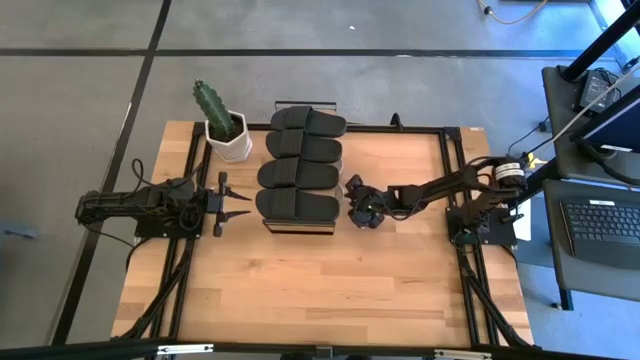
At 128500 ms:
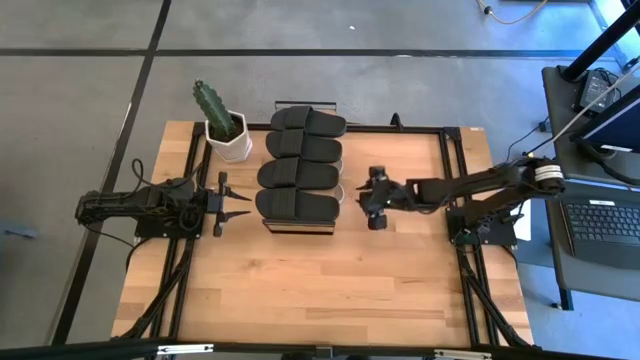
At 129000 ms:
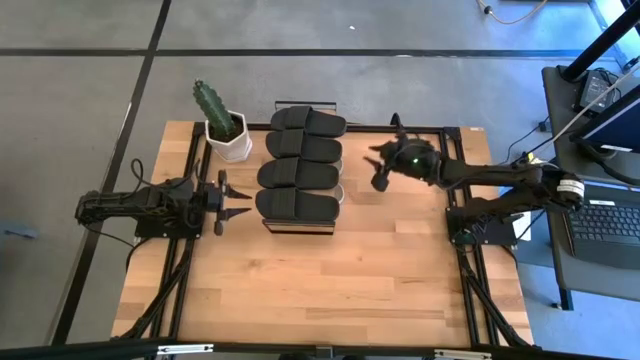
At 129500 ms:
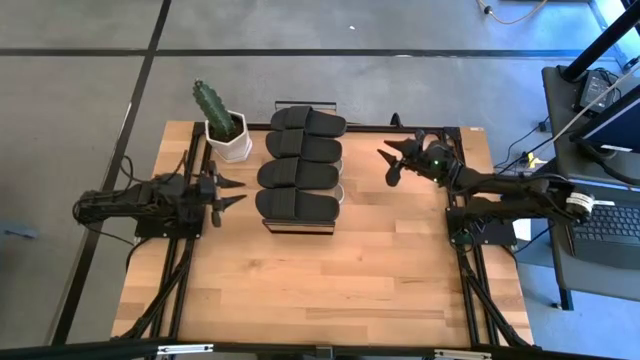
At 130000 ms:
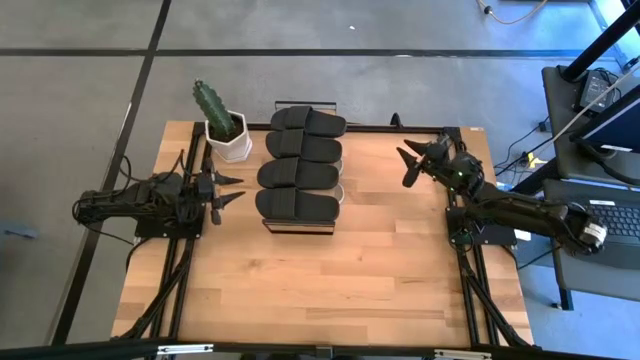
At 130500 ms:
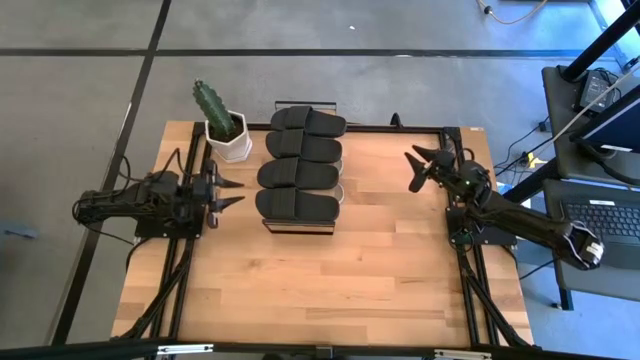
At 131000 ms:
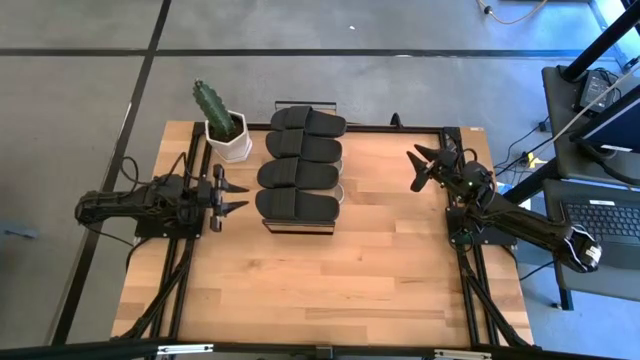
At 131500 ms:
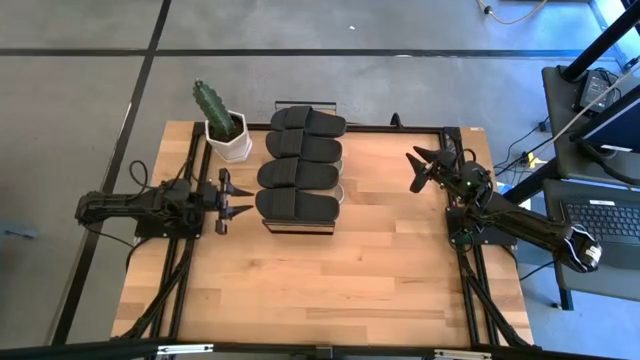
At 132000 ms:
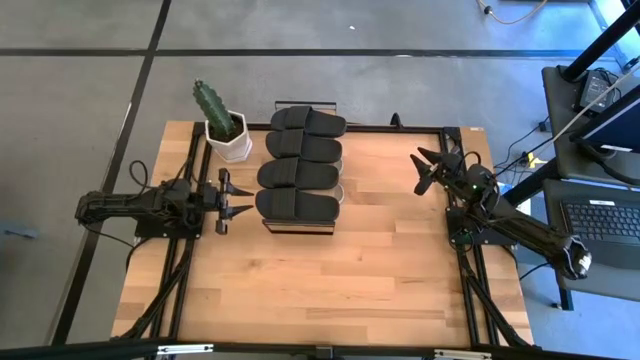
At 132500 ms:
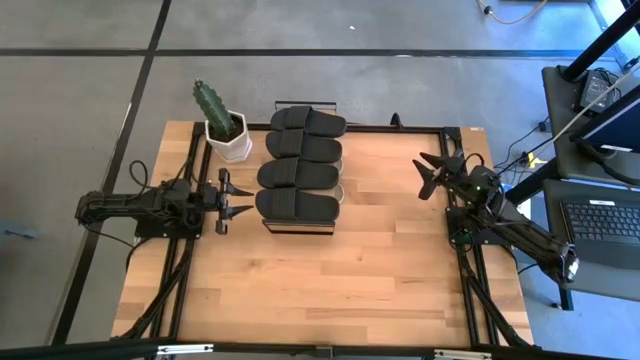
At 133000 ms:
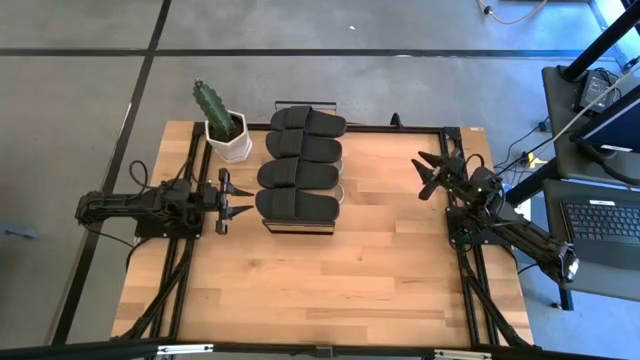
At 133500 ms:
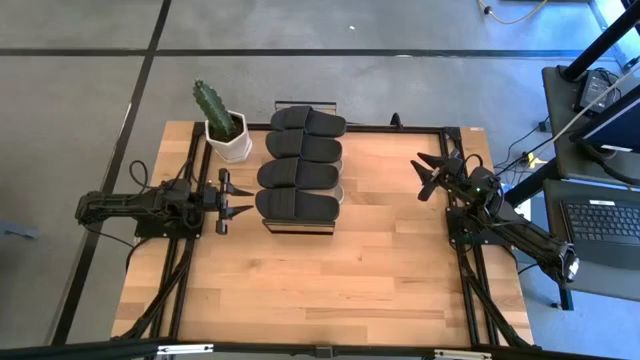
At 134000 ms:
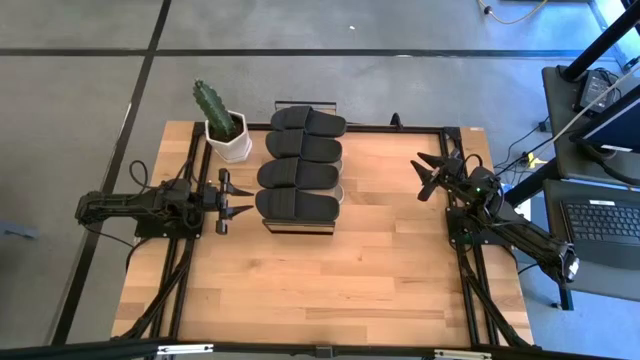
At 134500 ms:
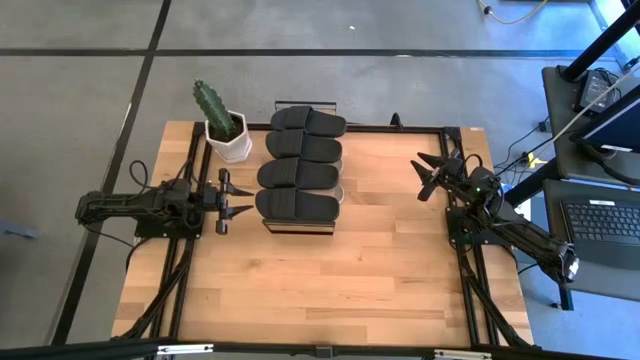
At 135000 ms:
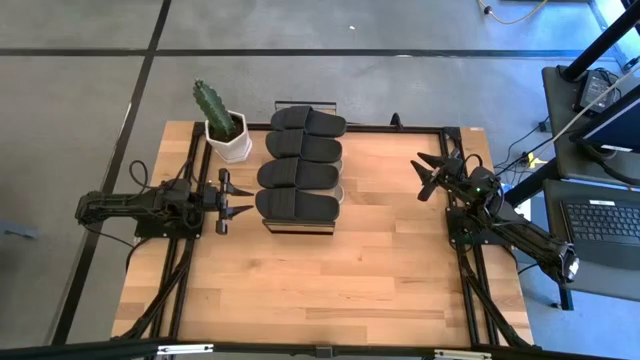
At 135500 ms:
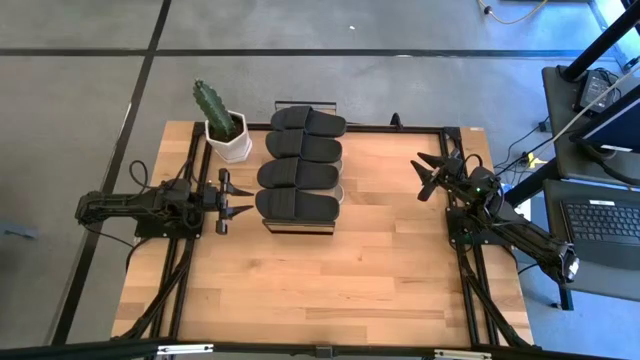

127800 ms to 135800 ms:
Task: Pick and place slides into the shelf
Return to home position

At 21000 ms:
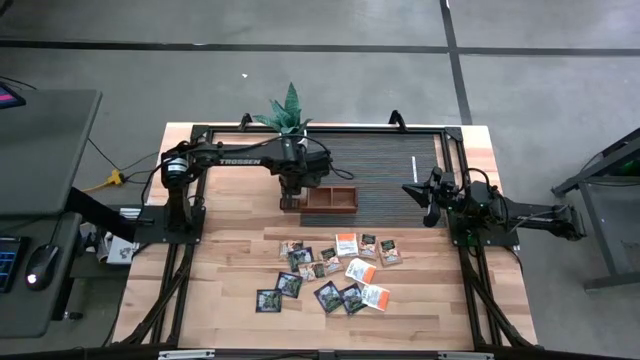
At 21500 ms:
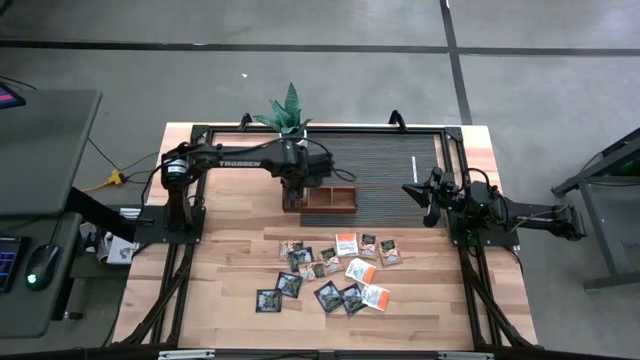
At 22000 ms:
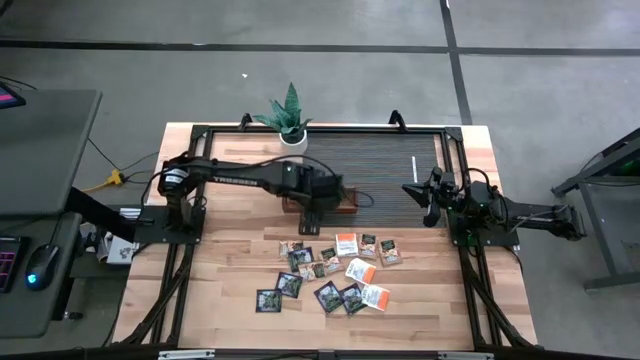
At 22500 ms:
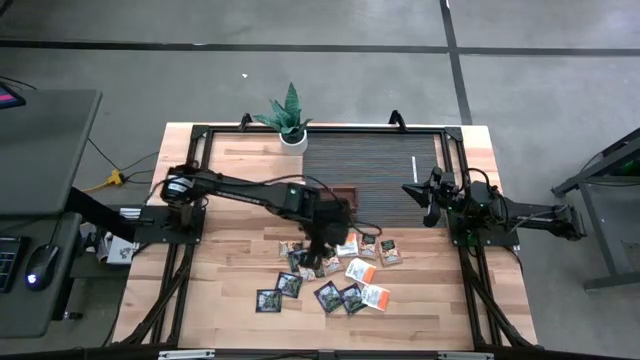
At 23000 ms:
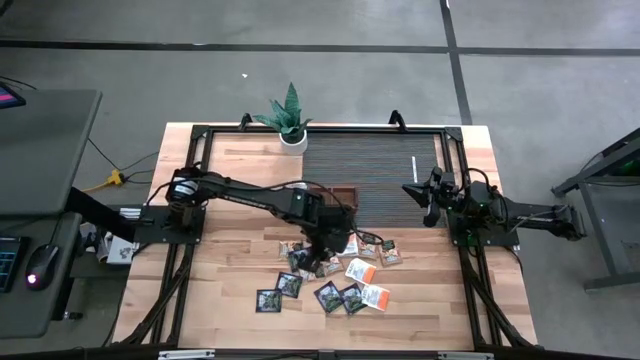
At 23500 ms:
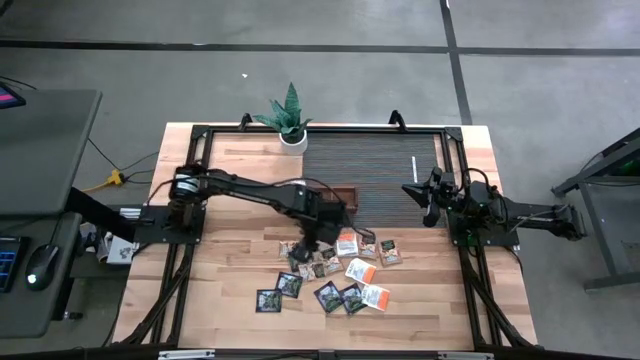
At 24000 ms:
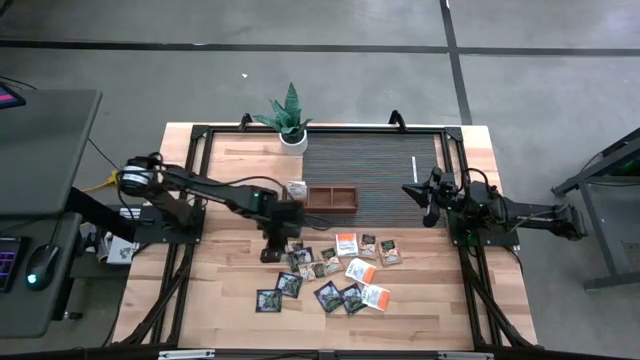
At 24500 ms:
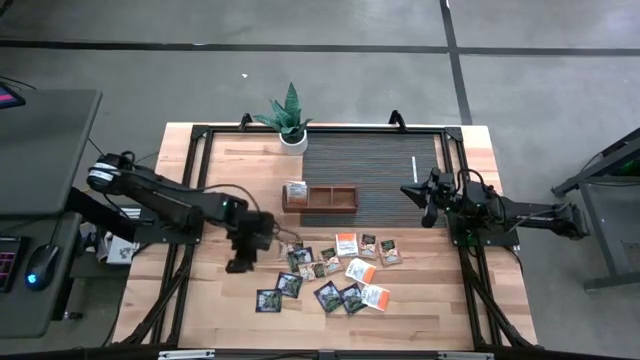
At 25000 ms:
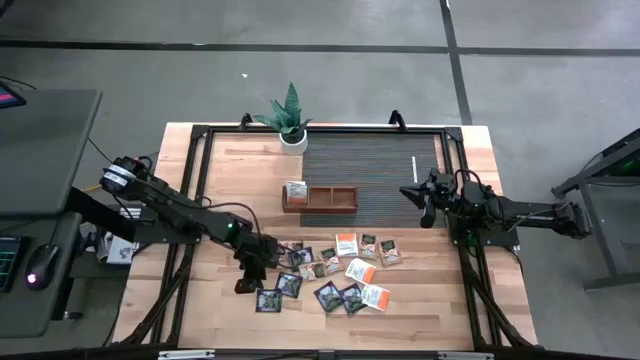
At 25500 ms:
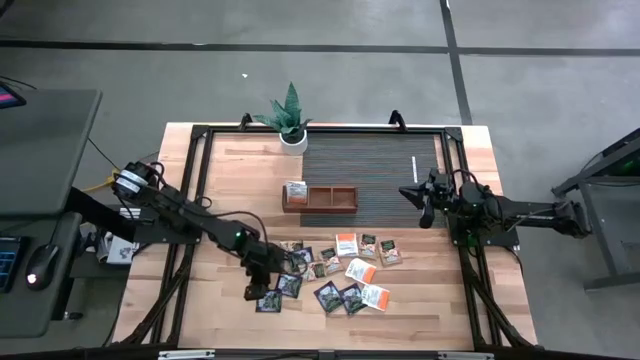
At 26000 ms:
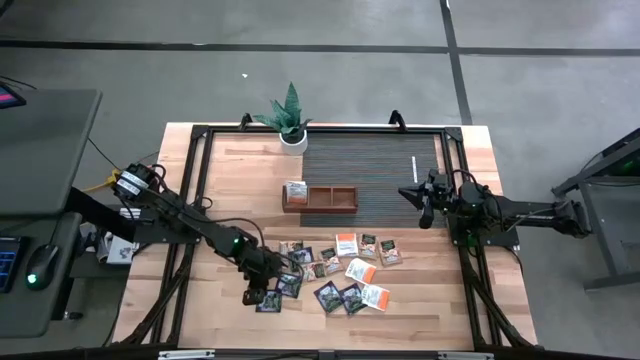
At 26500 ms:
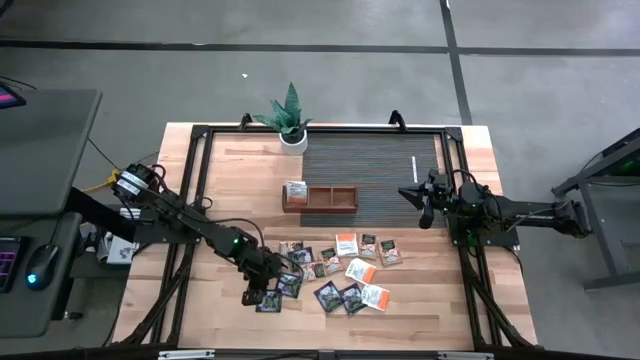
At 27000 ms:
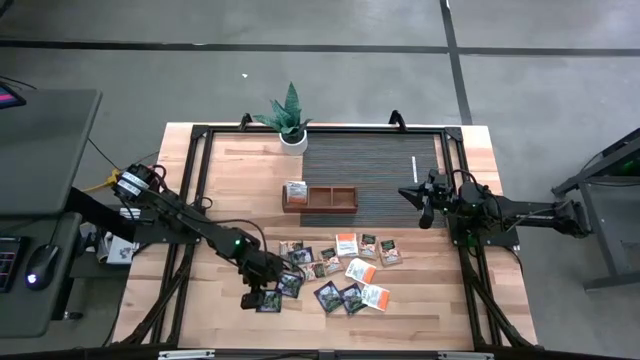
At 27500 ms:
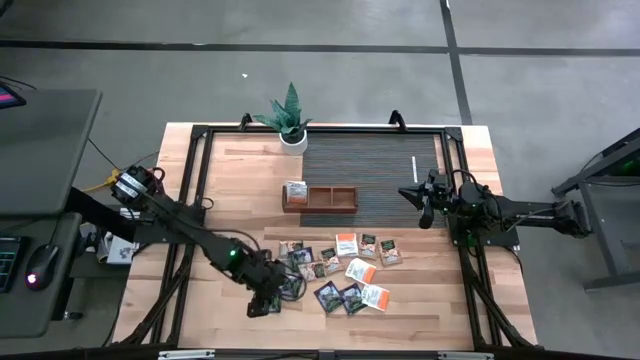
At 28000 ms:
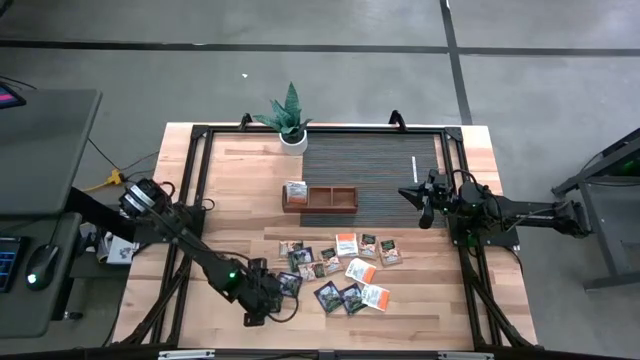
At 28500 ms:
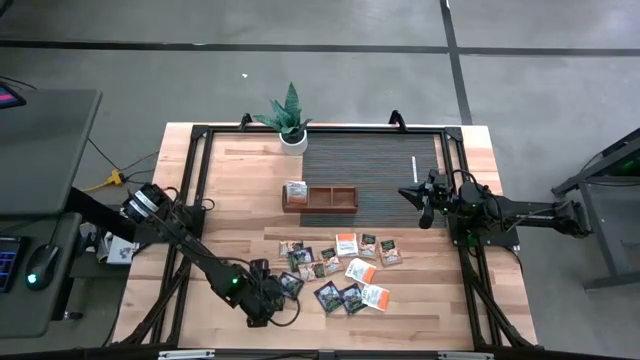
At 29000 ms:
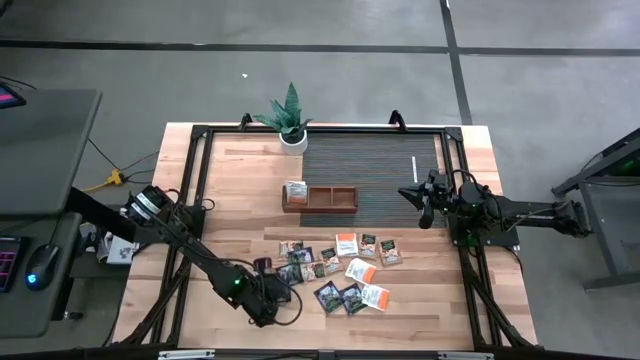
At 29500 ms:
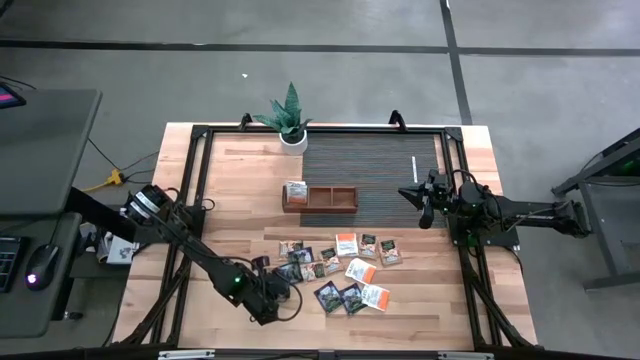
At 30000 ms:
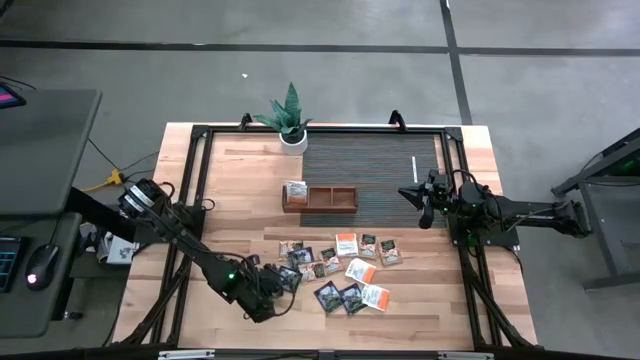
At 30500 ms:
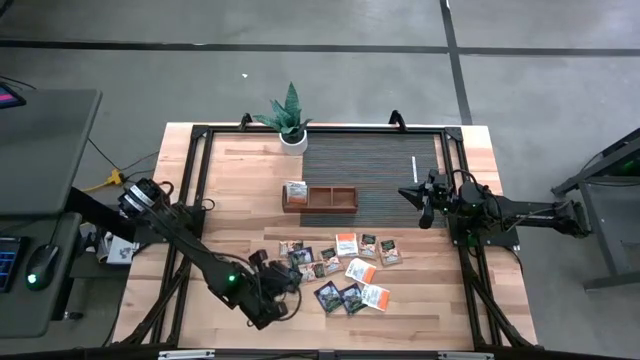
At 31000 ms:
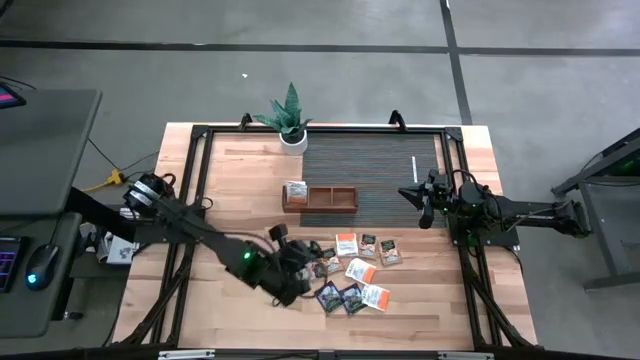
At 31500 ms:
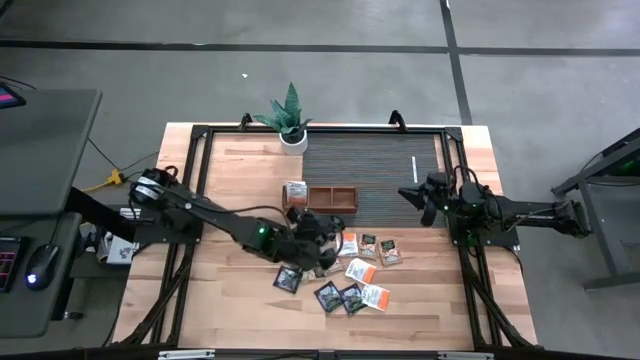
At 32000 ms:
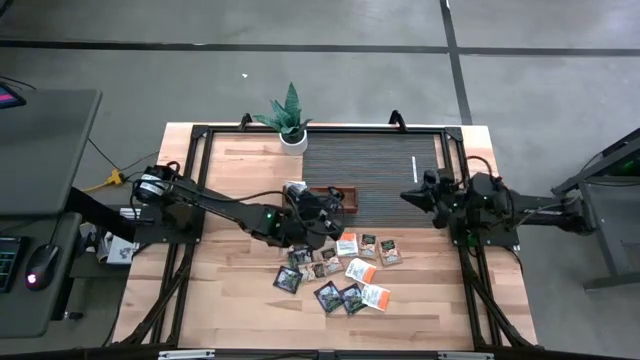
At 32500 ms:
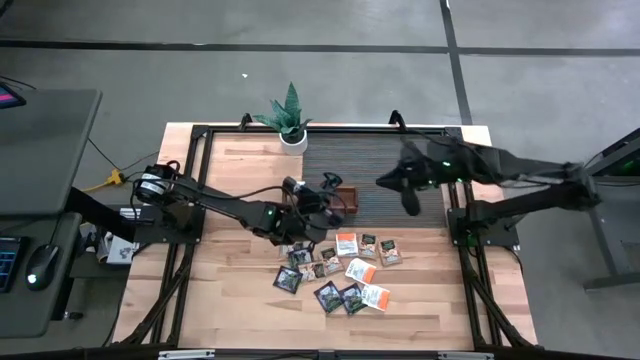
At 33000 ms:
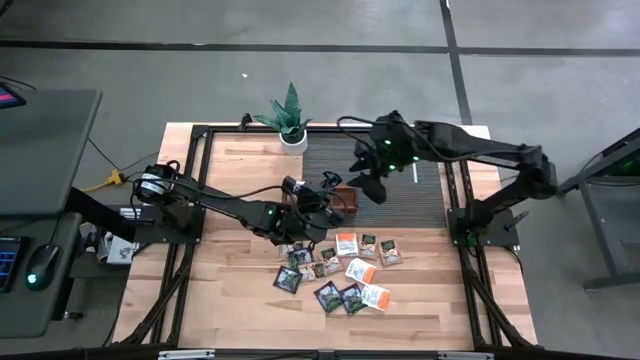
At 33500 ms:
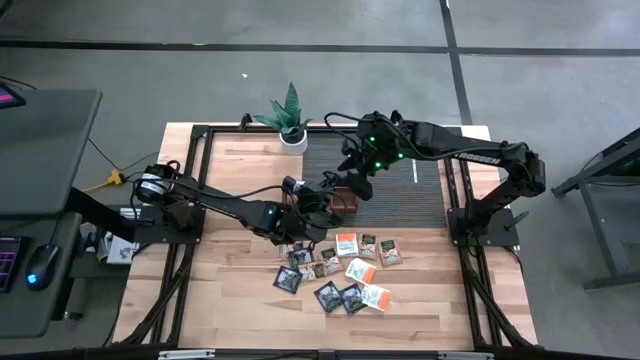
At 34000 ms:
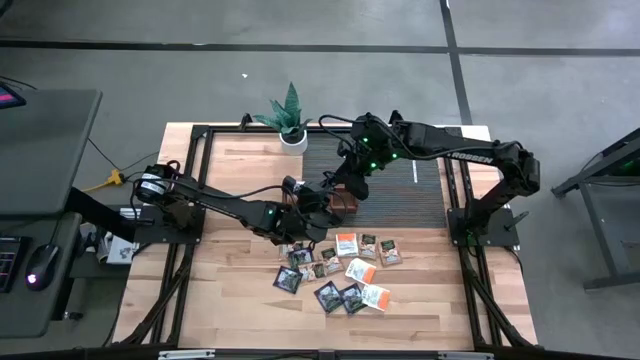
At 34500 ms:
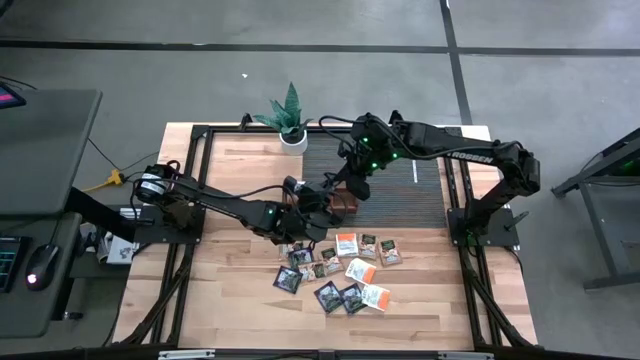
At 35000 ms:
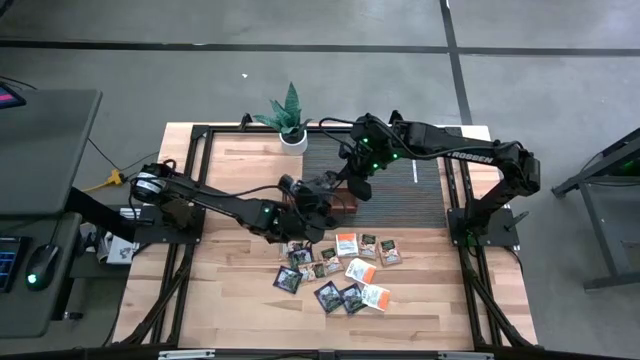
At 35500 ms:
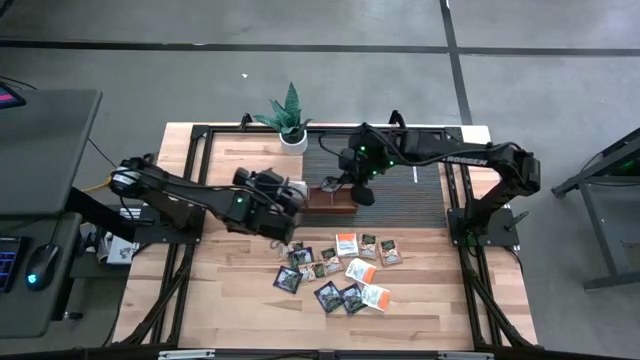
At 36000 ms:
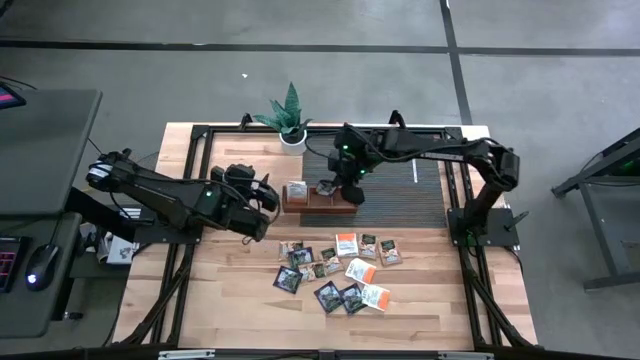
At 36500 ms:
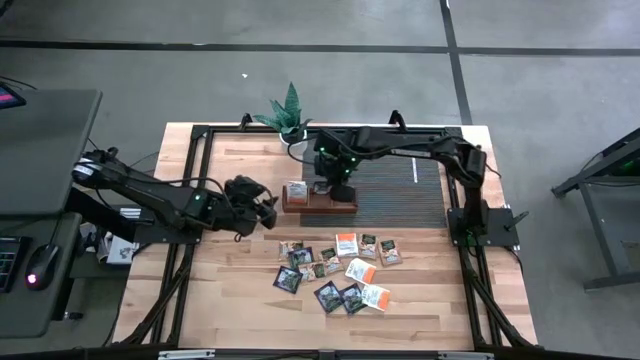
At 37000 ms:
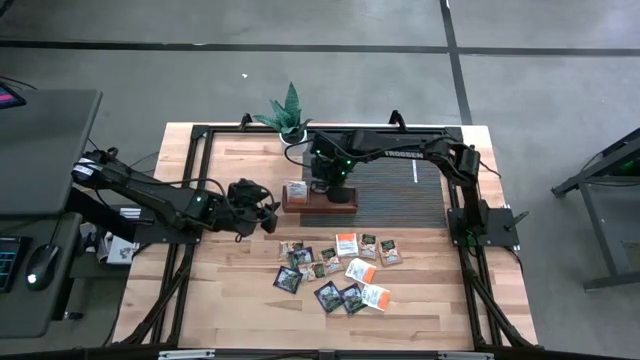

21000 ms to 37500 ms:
Task: Pick & Place Tea
Put the blue tea bag into the middle section of the wooden organizer
